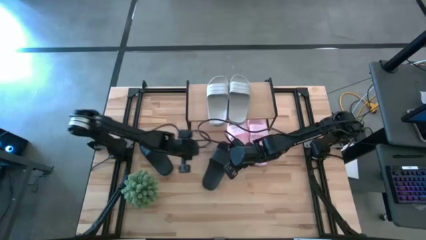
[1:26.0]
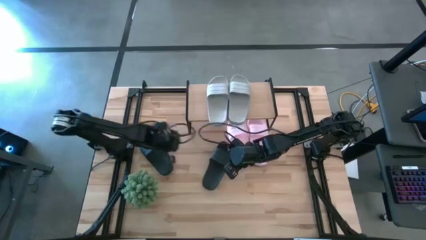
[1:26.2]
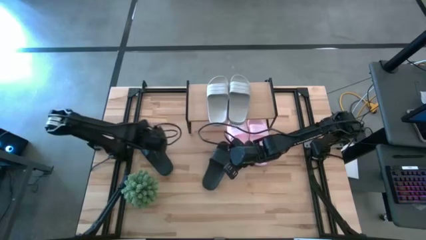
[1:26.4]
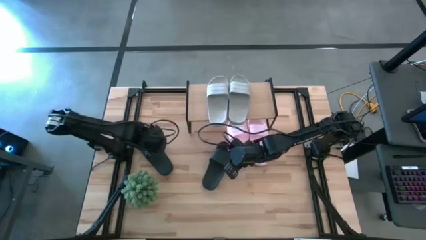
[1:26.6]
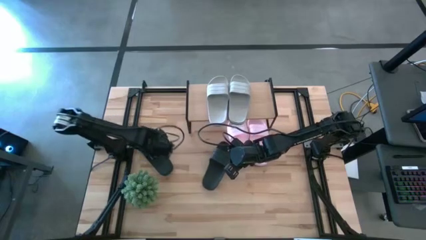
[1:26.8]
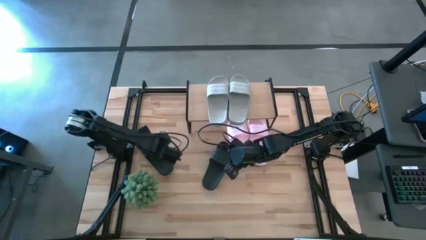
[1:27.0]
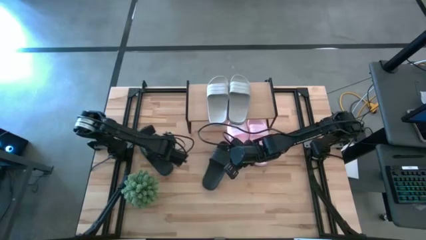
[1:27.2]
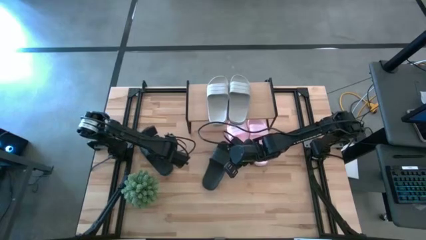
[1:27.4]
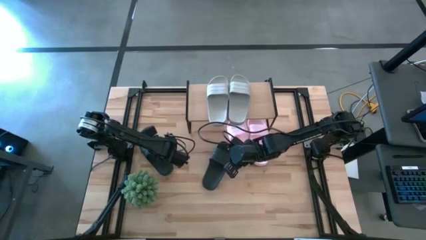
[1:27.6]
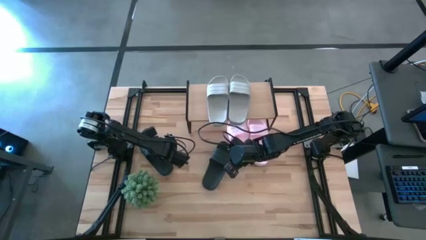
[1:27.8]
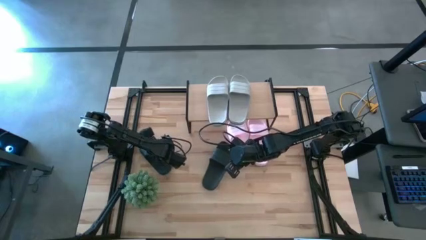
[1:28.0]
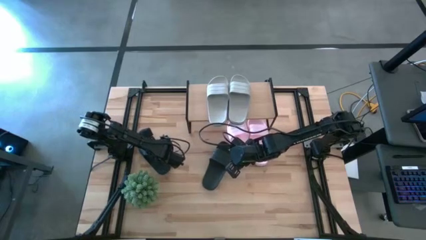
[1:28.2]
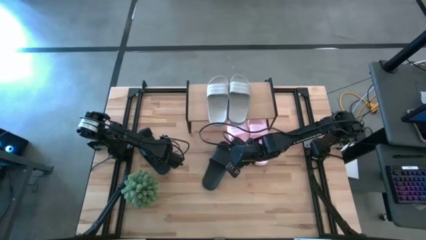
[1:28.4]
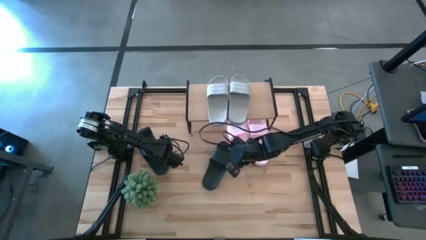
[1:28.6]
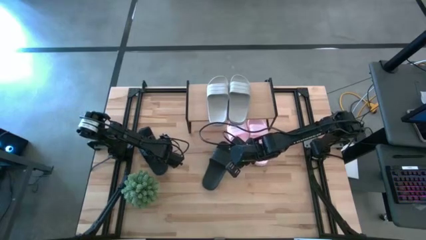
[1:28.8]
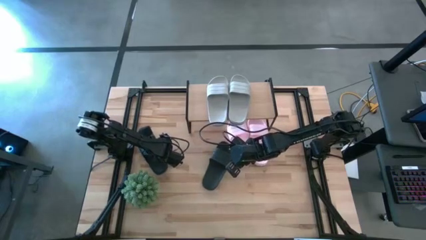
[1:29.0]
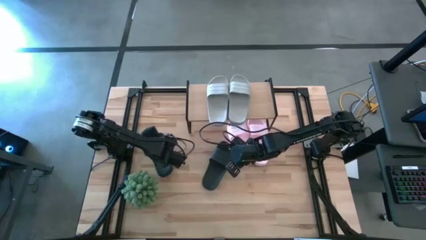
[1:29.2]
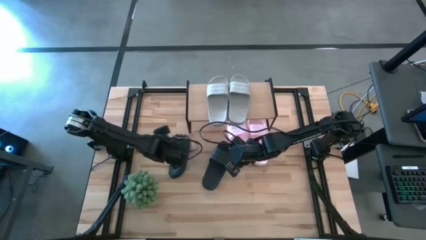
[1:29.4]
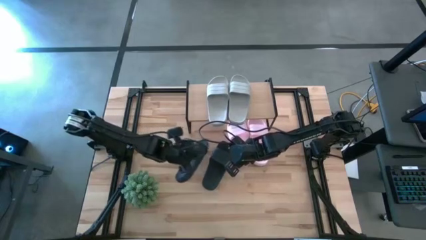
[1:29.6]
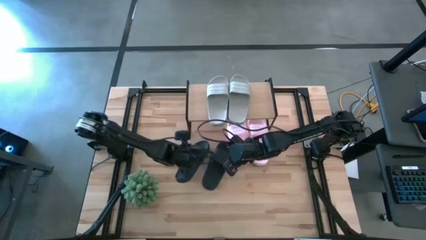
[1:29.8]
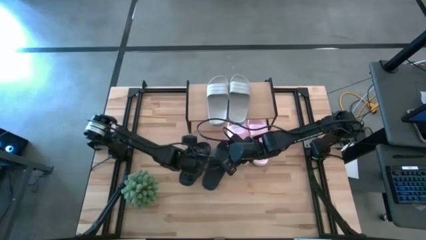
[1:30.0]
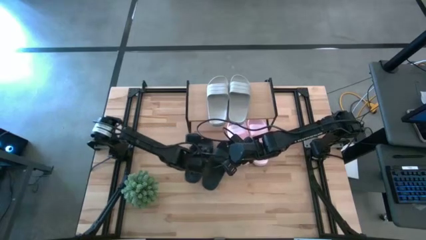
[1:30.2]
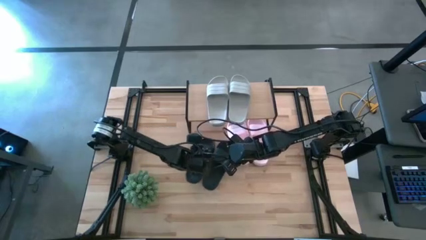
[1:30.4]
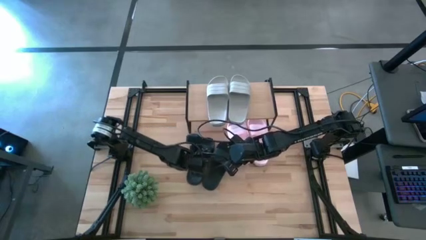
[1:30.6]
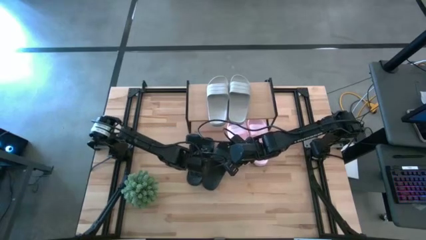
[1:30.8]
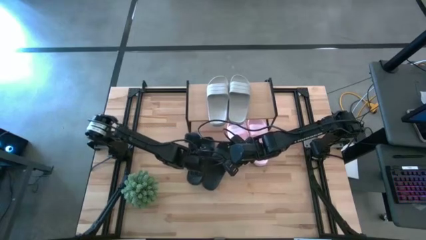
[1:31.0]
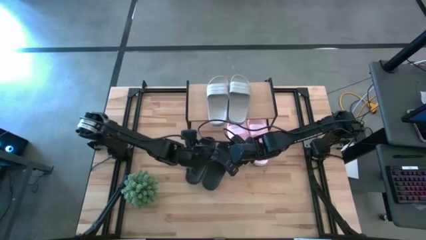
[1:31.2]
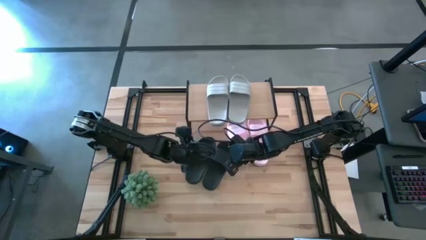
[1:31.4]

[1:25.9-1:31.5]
Task: Pick and place slides into the shelf
Put the black slide under the shelf

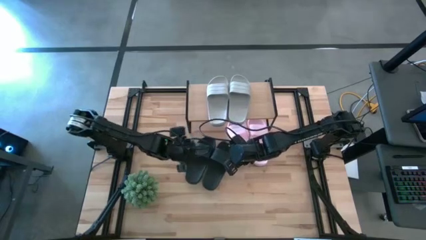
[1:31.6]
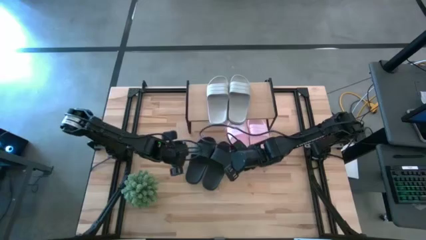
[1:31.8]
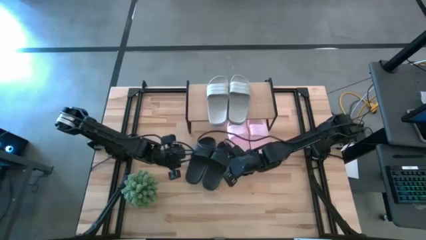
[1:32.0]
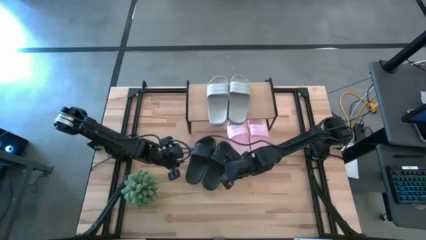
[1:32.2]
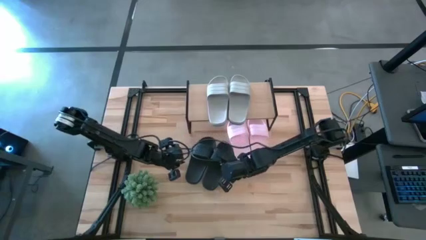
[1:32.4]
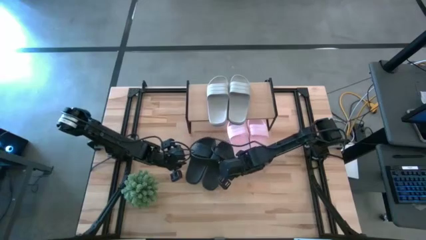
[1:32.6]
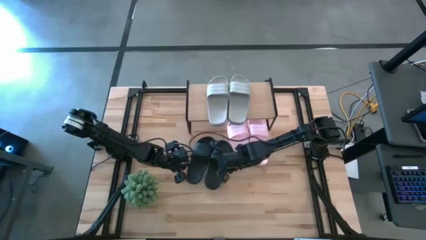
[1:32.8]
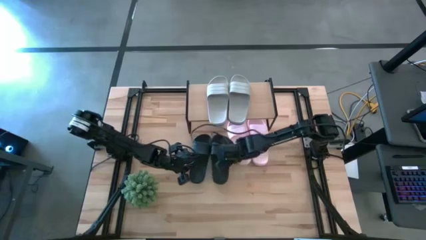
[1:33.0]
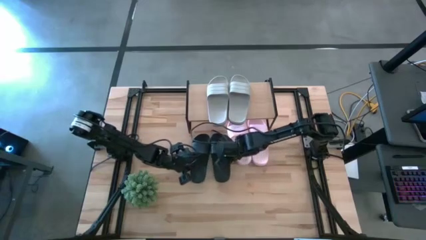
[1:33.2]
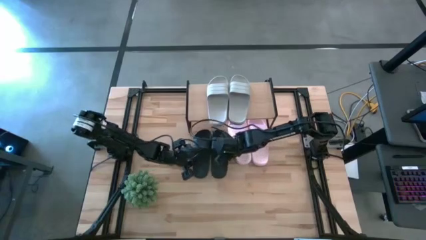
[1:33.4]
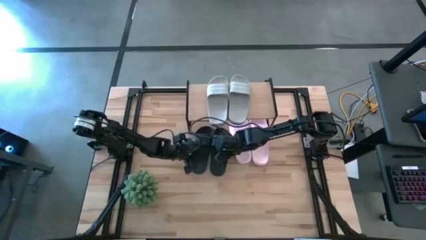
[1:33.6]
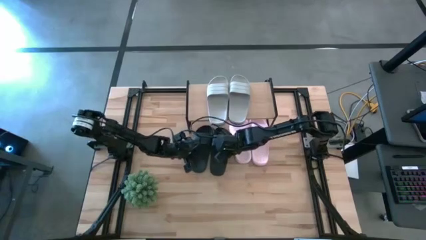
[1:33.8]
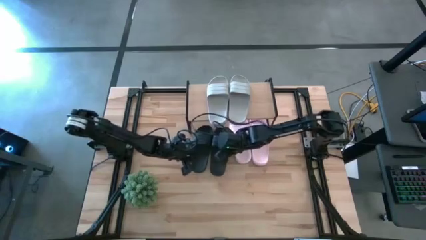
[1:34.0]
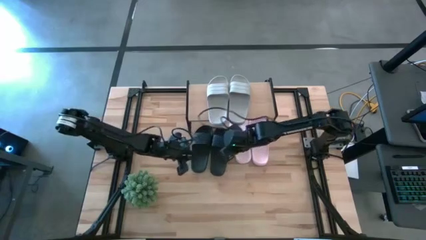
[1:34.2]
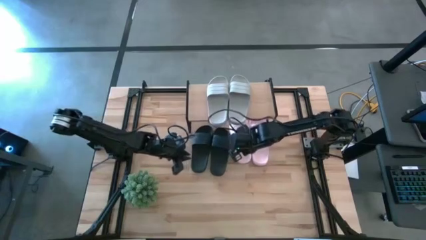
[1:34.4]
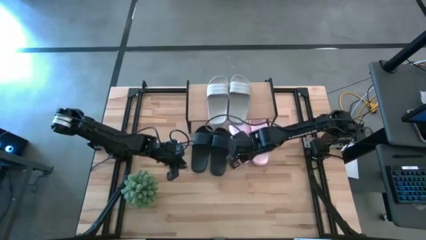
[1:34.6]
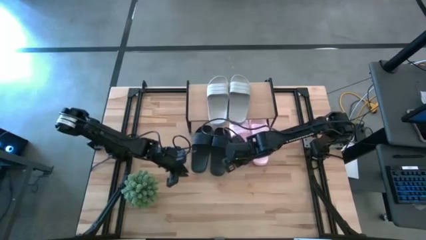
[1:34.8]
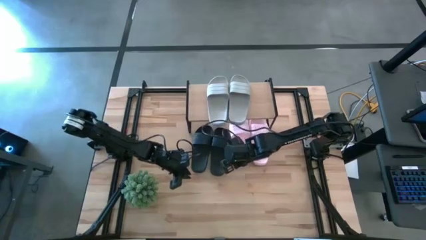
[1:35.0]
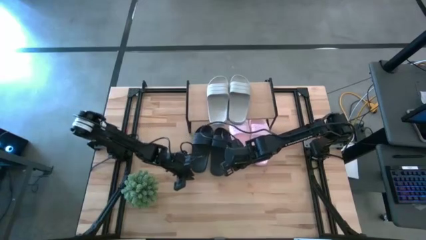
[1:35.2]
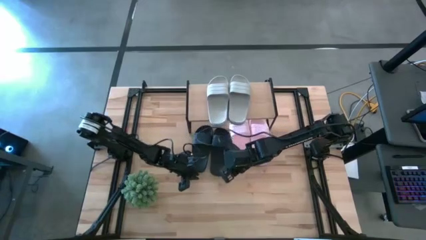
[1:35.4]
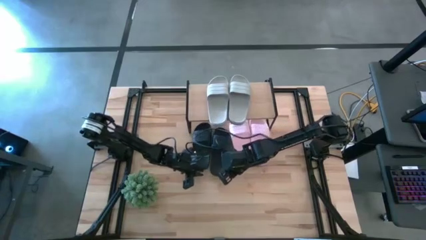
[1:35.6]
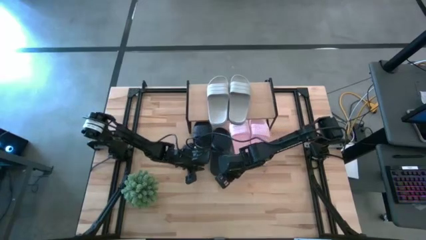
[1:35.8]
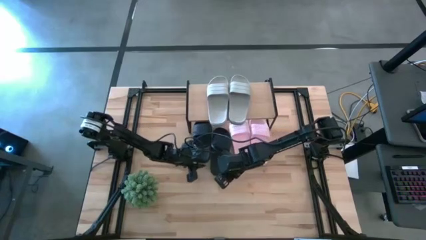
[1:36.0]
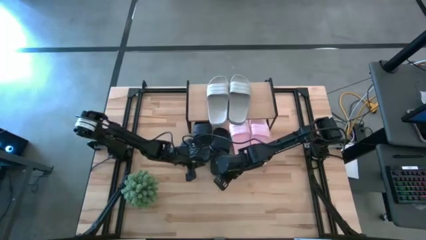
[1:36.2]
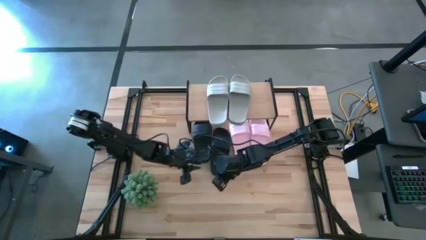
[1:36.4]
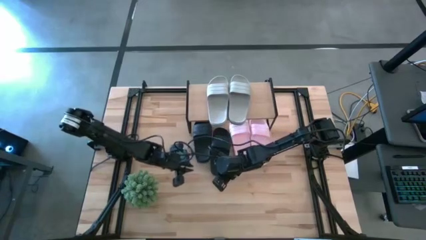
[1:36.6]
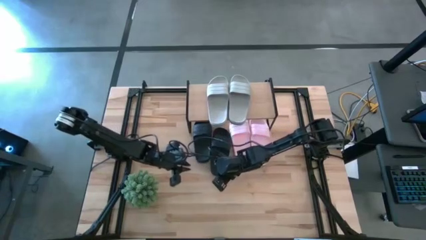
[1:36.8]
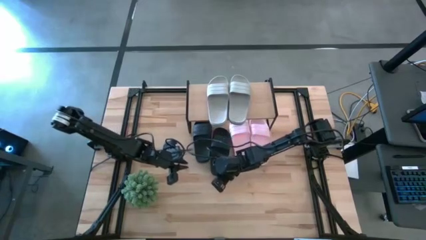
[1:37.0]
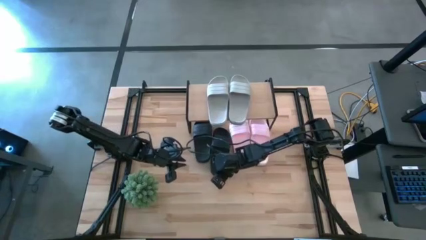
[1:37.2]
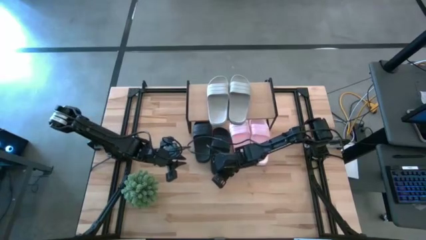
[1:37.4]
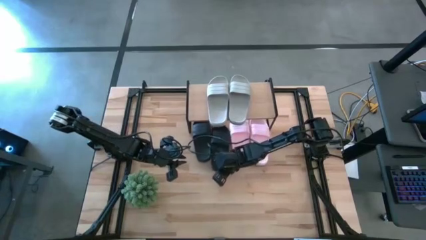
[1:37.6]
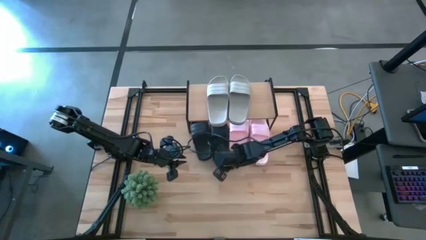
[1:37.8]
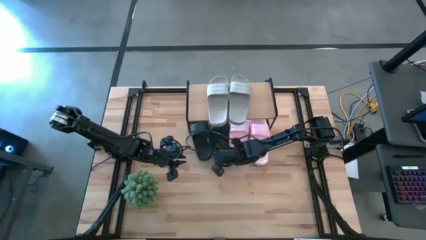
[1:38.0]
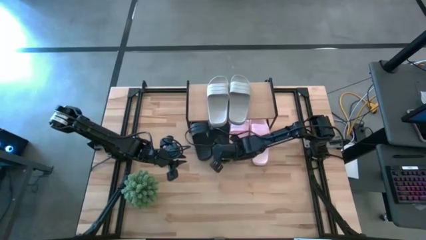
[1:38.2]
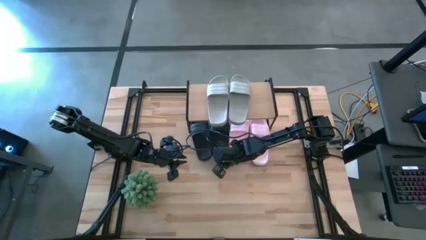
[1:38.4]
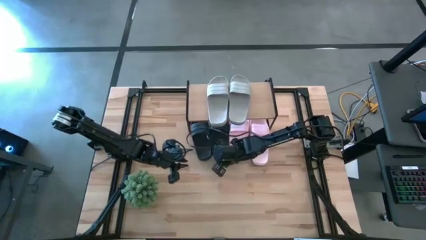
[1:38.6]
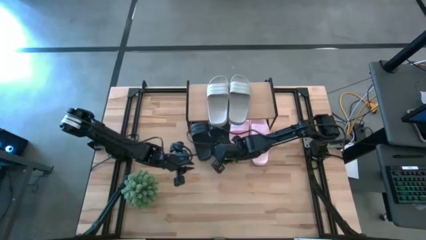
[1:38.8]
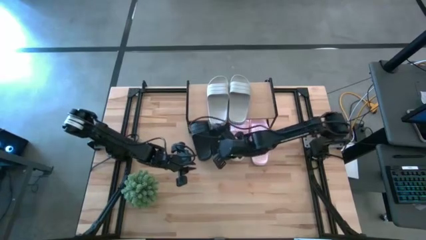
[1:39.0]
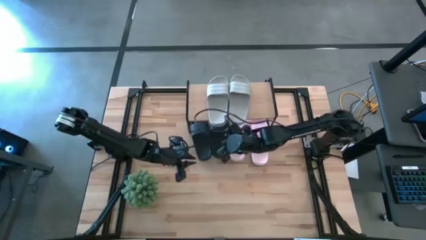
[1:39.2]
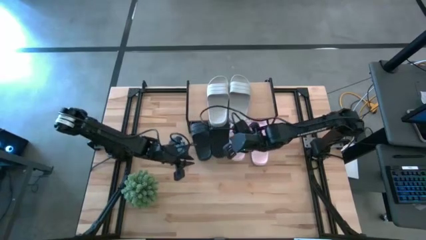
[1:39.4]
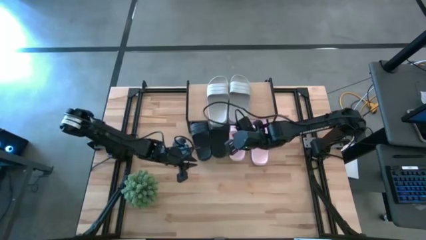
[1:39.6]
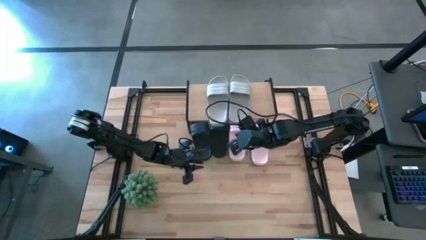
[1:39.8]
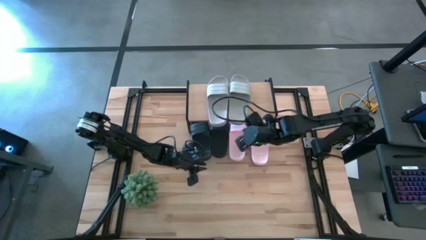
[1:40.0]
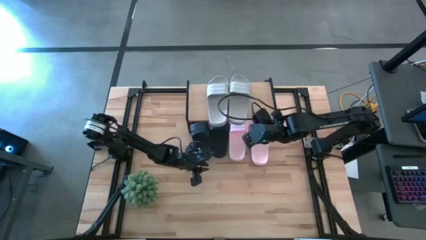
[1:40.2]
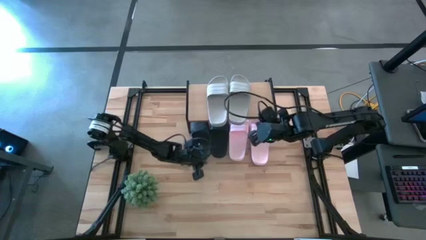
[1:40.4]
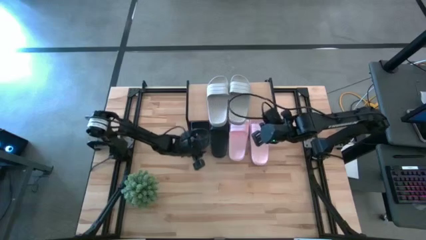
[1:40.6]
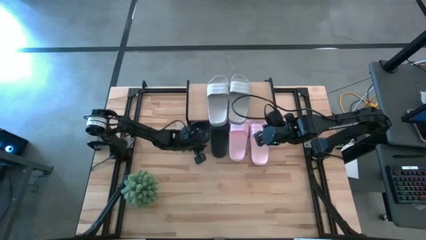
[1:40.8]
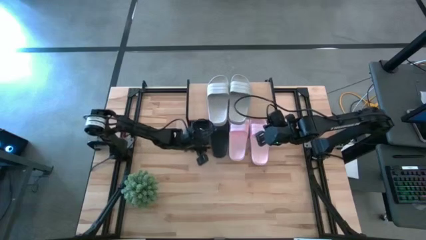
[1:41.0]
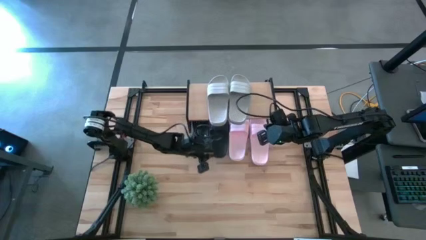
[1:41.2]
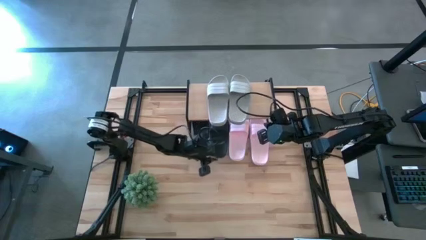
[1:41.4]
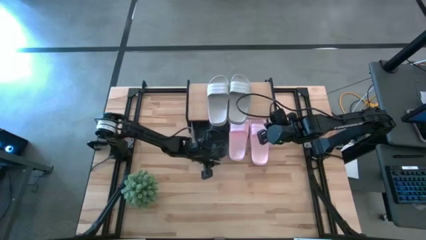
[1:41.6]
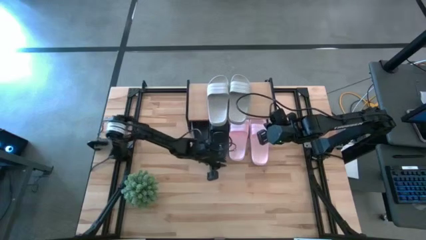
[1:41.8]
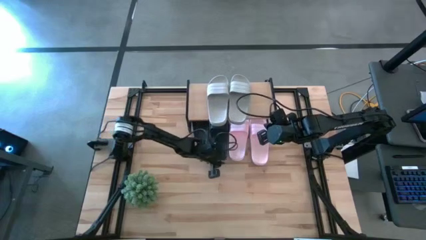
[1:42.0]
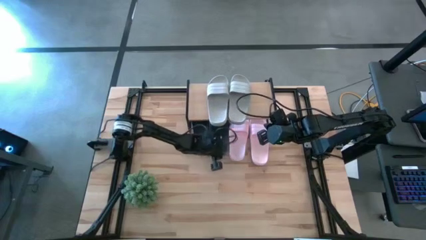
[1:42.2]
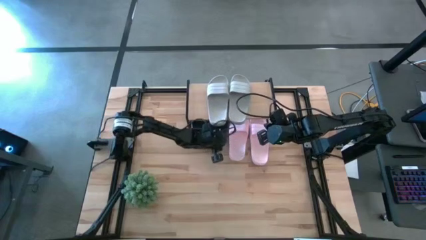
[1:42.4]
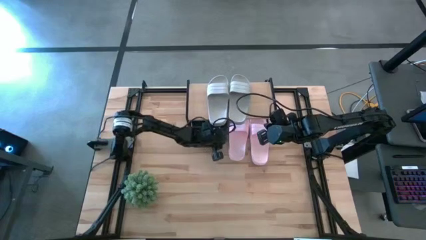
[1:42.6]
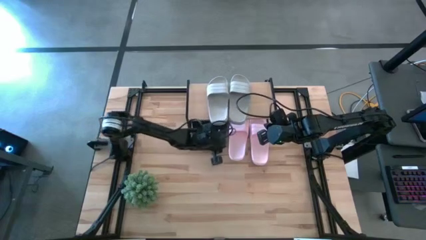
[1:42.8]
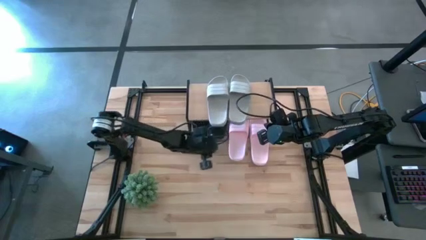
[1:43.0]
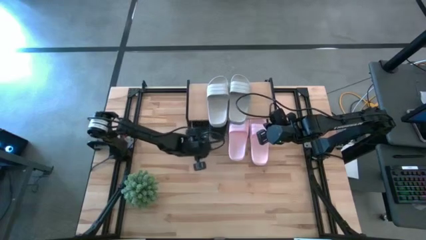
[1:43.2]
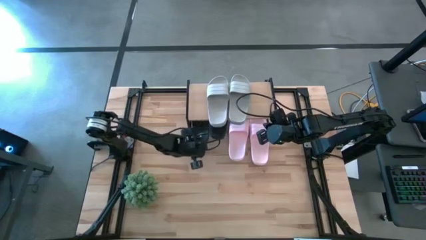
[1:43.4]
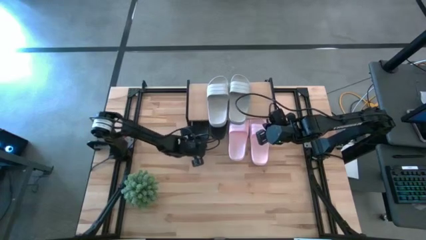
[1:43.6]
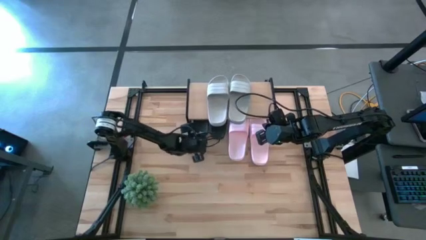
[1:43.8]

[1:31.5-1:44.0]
Adjust the black slides under the shelf
